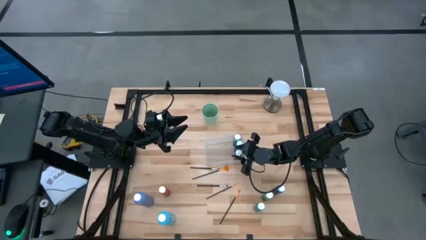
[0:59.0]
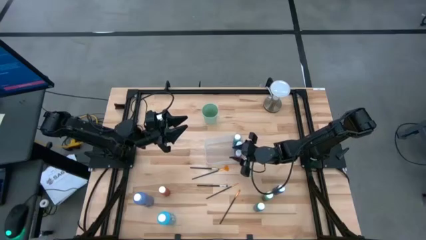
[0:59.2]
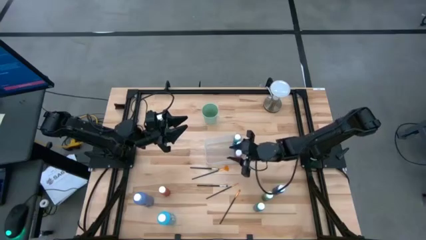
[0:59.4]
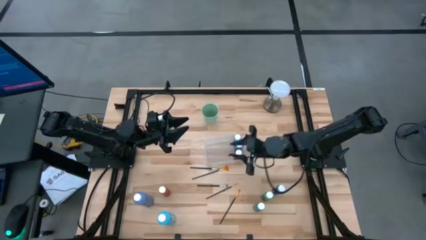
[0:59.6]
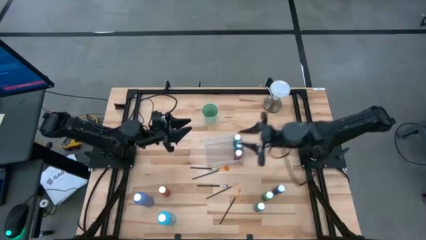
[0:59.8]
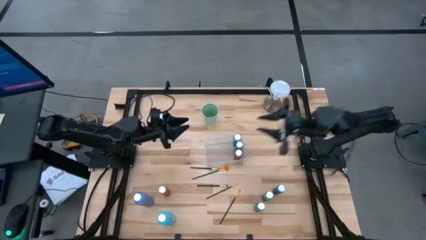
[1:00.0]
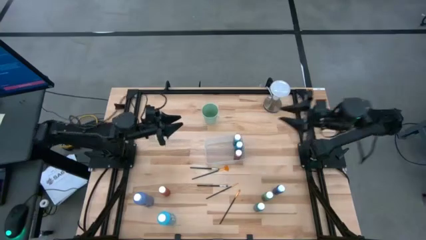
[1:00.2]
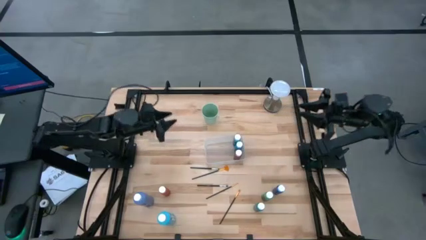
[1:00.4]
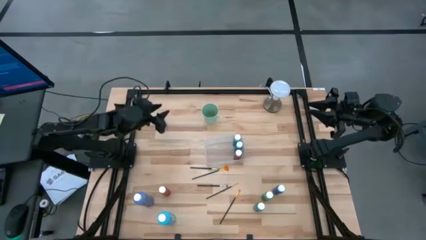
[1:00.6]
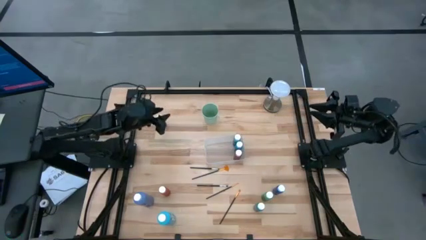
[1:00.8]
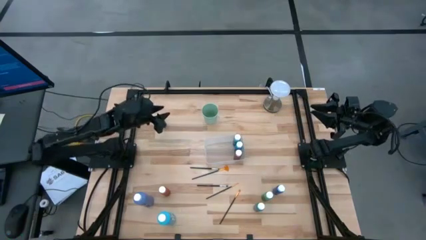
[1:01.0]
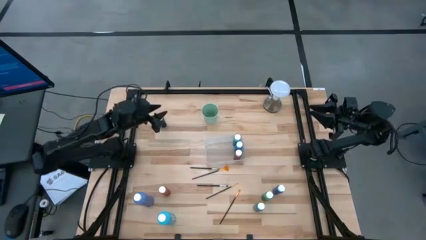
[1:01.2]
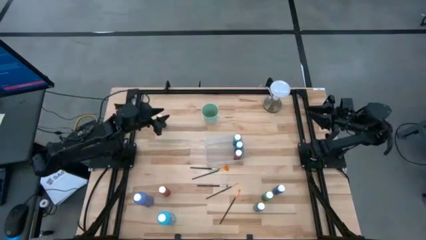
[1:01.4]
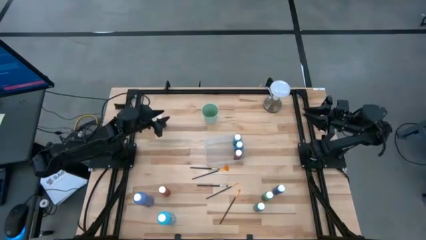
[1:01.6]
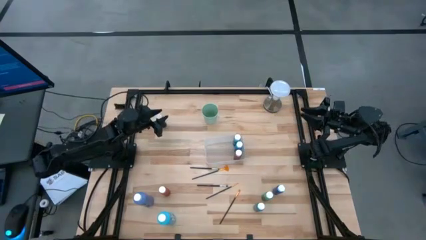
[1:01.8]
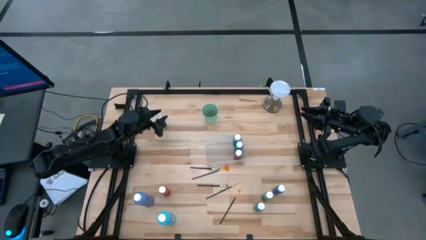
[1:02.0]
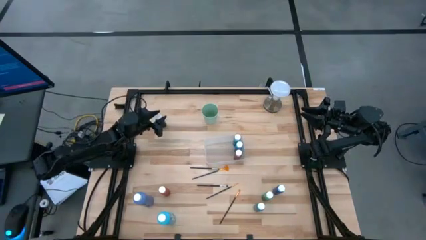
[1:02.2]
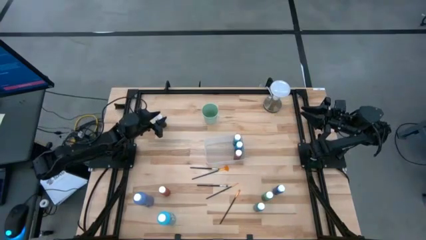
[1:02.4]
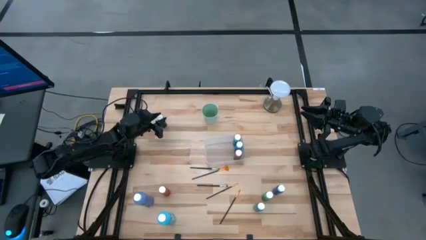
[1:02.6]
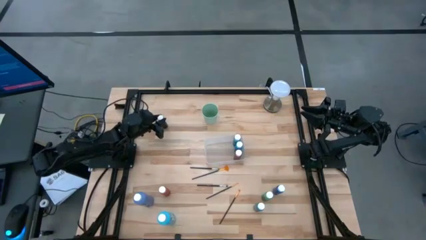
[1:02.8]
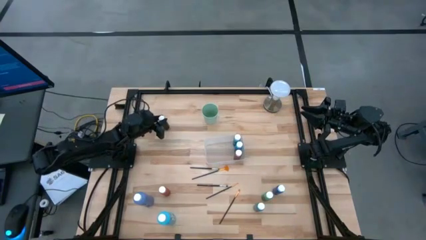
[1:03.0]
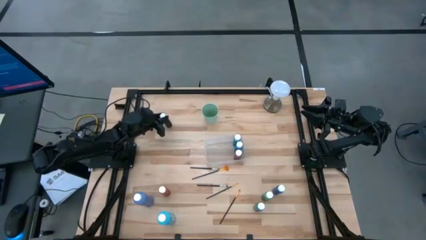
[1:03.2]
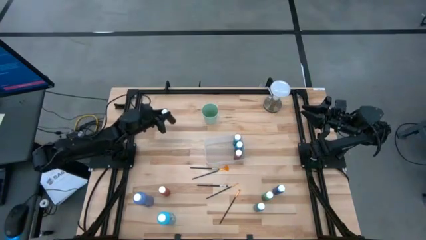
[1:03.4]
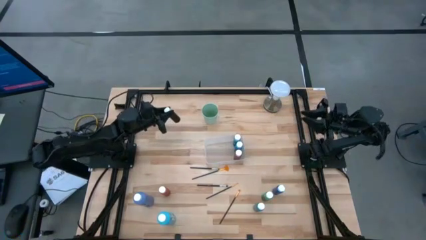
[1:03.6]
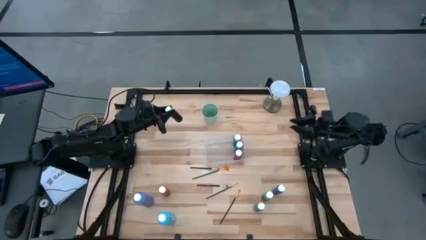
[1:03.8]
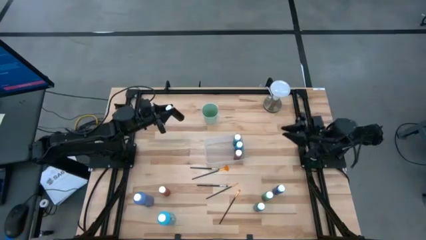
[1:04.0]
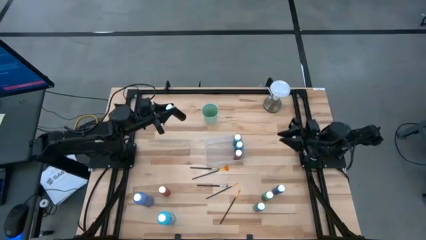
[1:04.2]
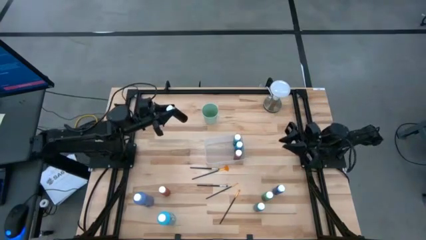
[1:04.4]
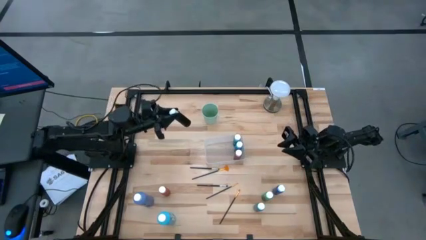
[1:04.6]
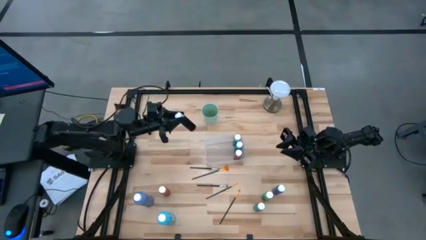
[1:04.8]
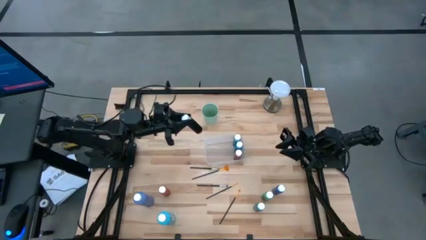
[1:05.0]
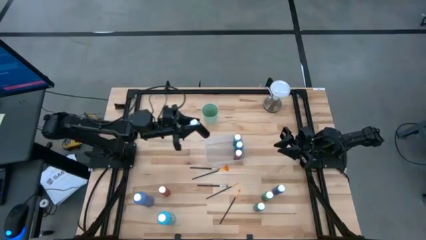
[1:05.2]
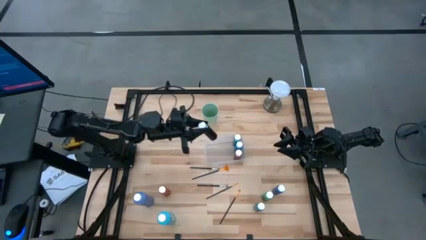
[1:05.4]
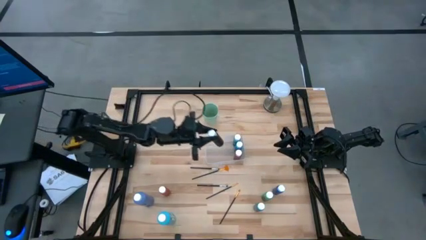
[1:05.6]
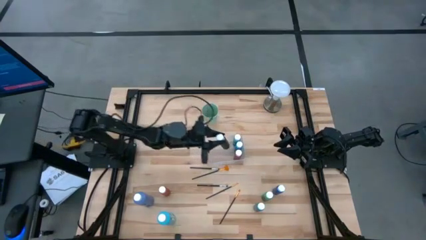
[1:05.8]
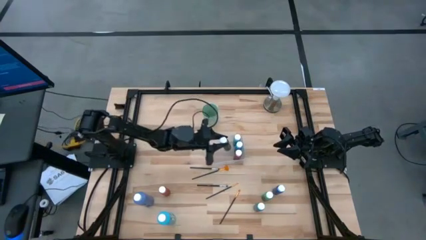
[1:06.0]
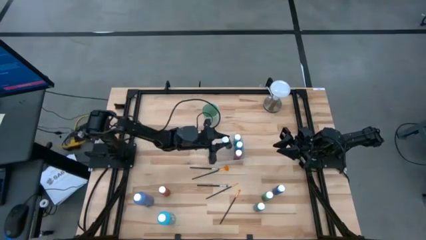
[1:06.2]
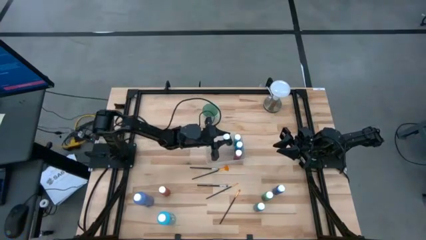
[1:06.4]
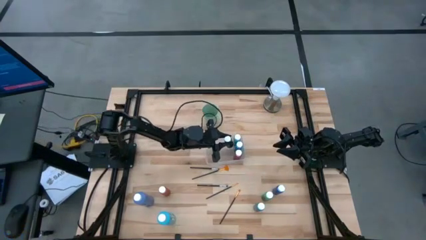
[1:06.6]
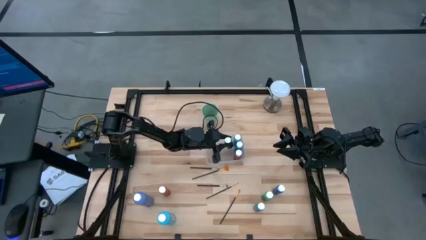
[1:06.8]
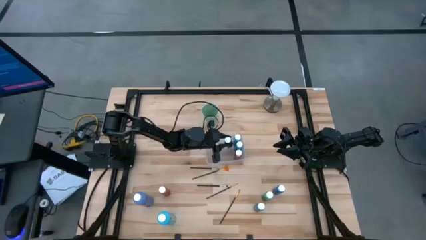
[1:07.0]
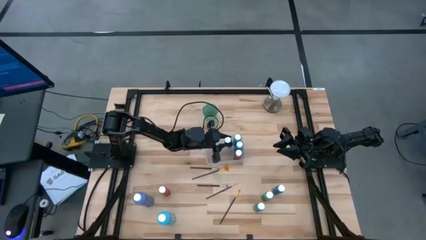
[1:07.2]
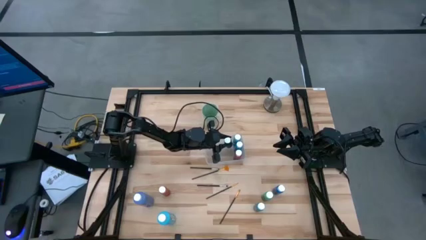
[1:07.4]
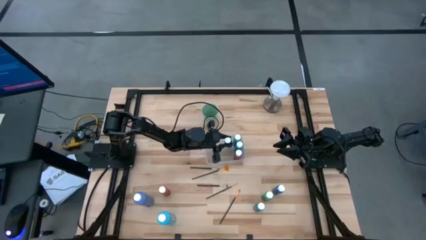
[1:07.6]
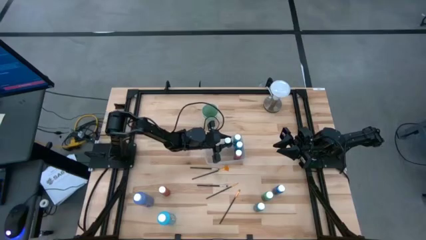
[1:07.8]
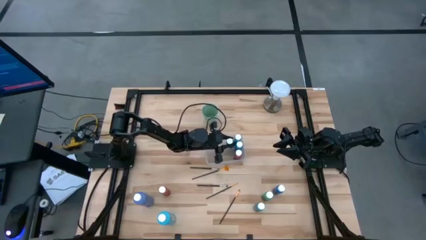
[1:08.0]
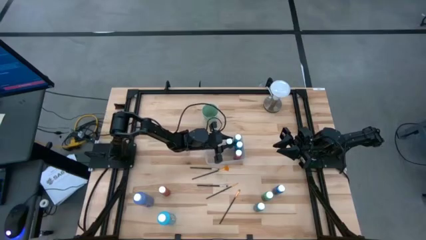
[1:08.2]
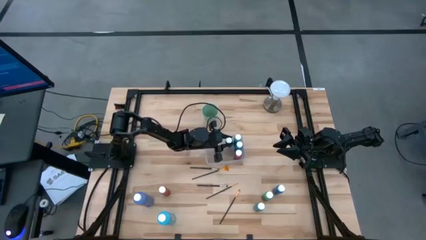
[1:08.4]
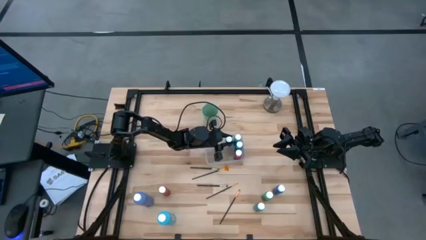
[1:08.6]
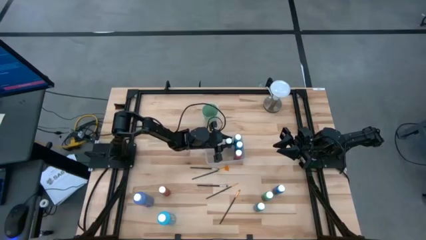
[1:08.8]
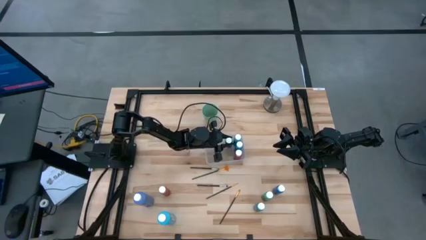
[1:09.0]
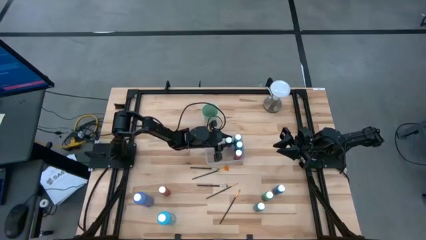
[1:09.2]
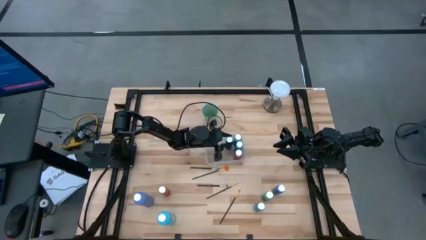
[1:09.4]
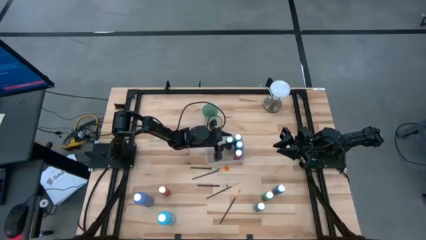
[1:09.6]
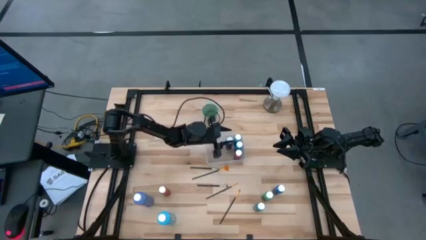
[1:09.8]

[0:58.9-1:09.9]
Task: Pick & Place Paint Supplies
Put the black paint bottle into the transparent bin

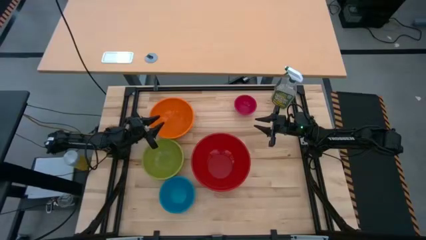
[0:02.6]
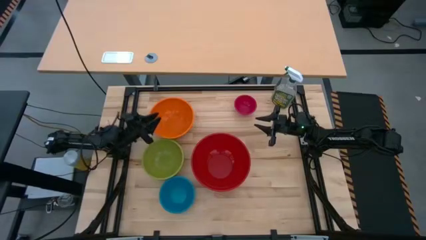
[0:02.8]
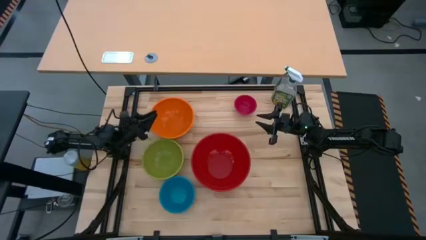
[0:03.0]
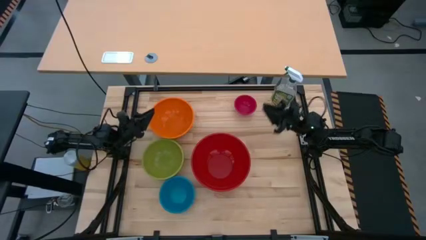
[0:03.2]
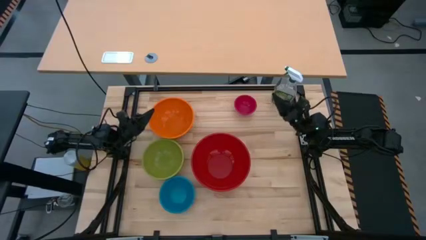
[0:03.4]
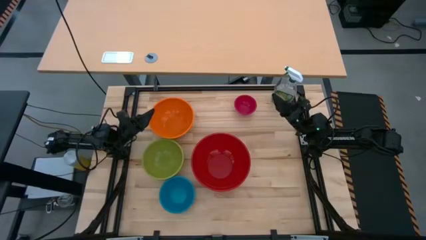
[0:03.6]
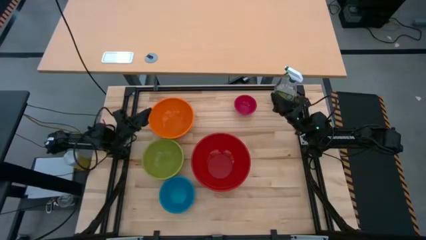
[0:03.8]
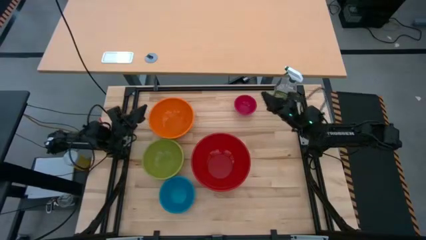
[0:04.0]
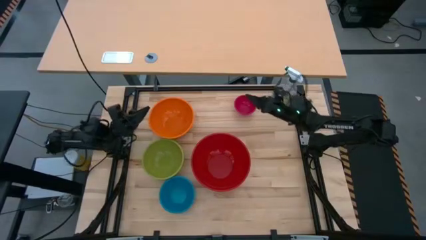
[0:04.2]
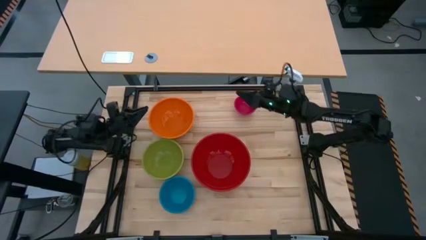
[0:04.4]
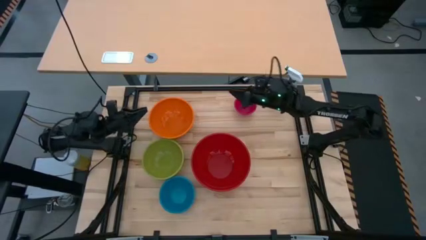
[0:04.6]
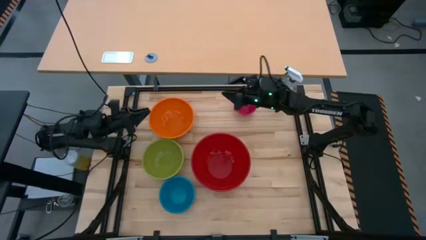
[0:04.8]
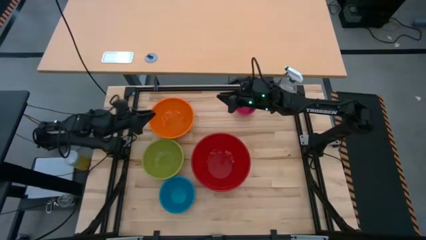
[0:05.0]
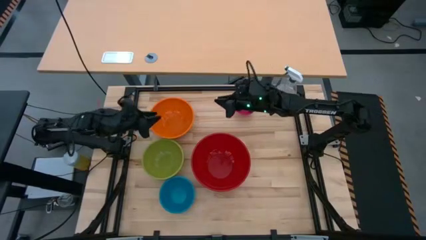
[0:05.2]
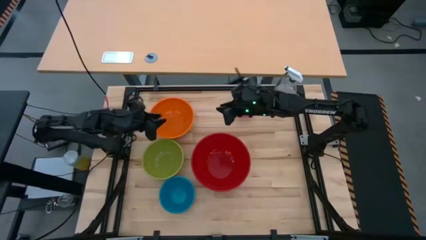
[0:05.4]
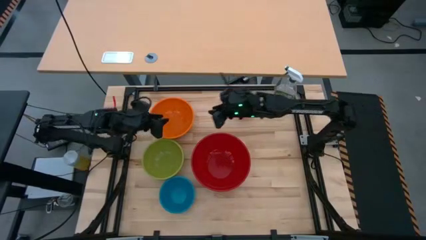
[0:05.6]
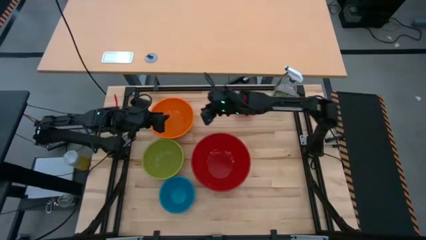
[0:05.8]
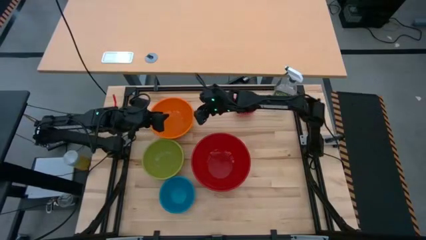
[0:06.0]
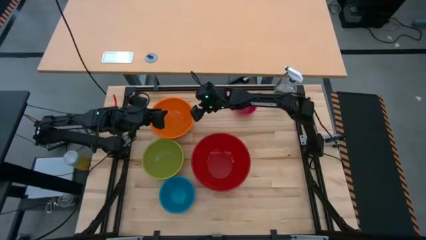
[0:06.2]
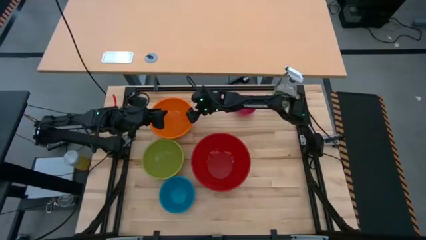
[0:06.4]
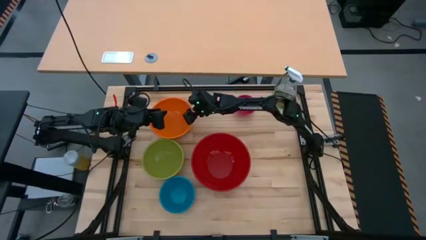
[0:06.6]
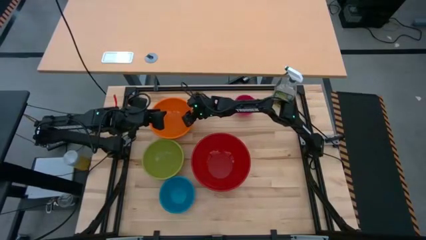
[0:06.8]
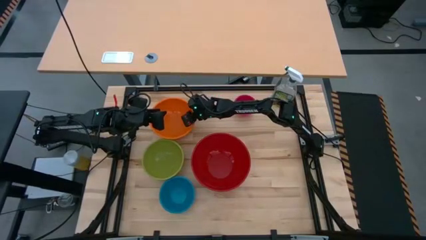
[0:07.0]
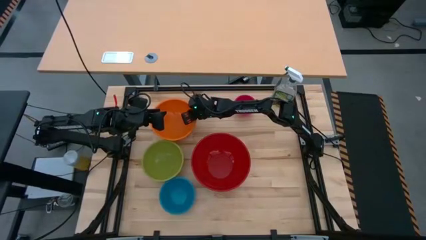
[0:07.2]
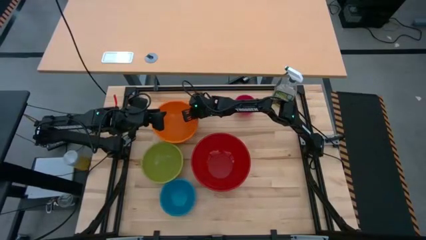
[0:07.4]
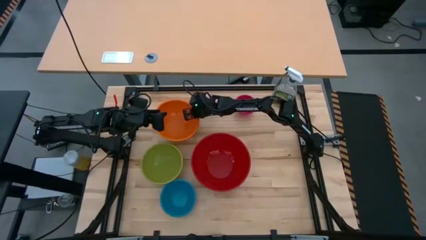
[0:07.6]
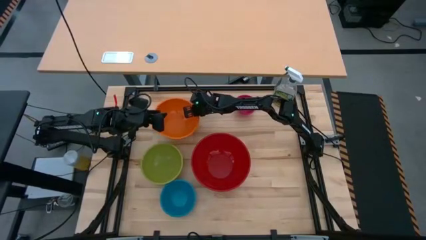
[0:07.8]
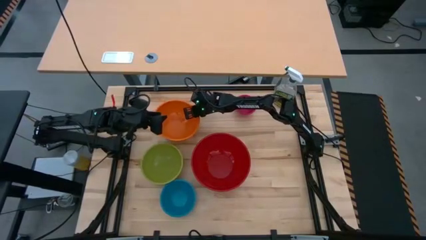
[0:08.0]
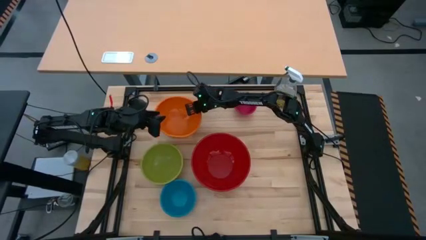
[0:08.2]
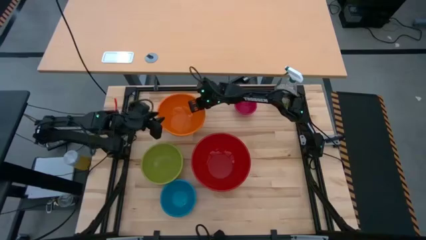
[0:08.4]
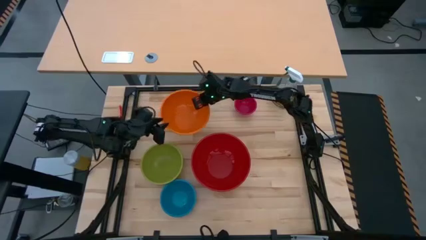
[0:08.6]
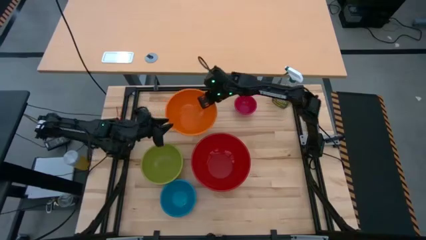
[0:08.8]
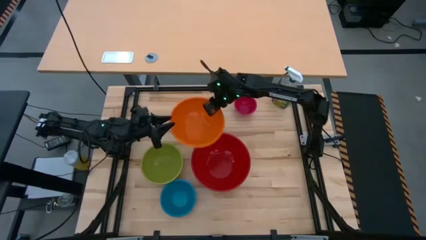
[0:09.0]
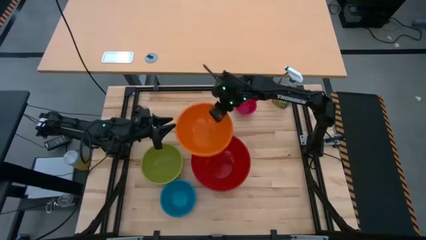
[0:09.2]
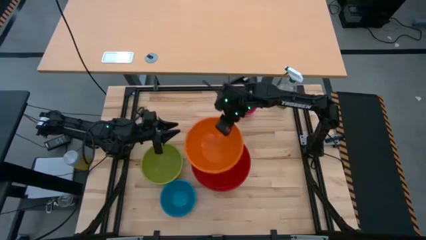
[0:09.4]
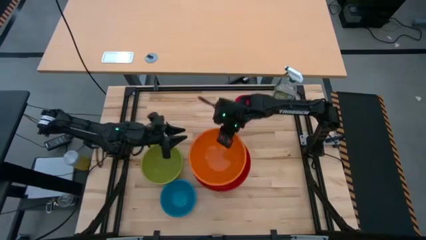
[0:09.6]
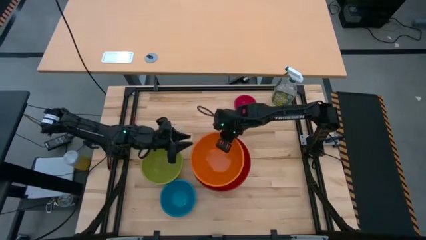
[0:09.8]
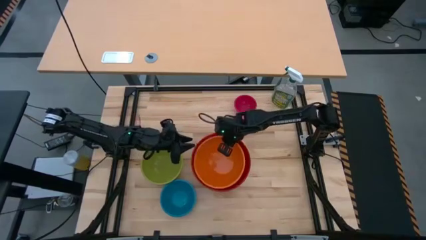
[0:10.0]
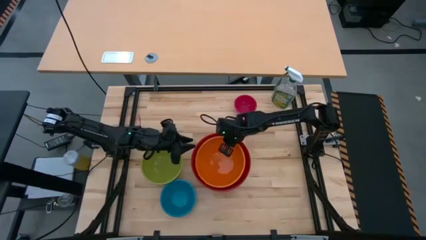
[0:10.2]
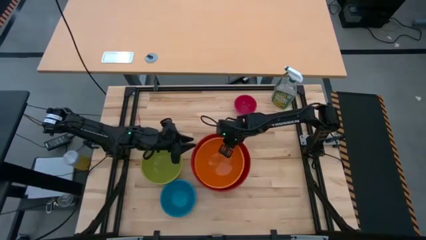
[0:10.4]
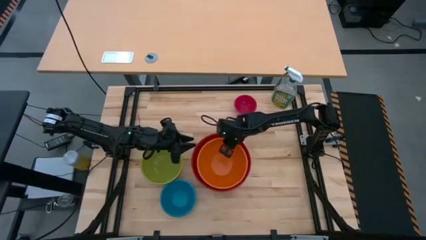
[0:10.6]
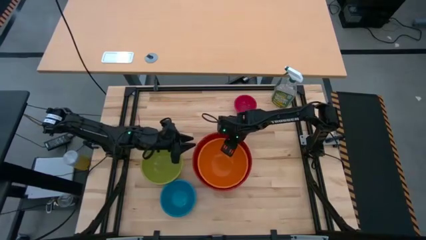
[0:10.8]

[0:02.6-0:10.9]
Task: Nest bowls inside each other by size order
Stack the orange bowl on top of the red bowl
